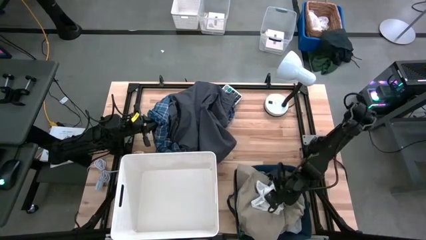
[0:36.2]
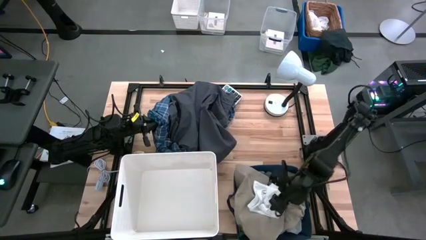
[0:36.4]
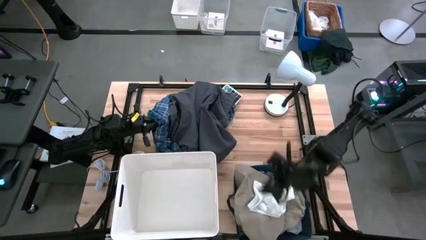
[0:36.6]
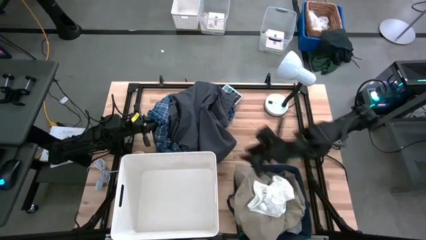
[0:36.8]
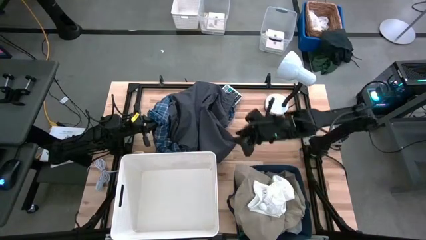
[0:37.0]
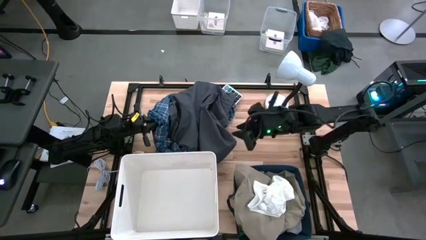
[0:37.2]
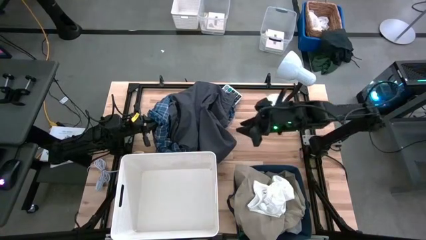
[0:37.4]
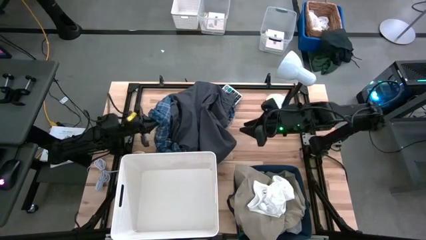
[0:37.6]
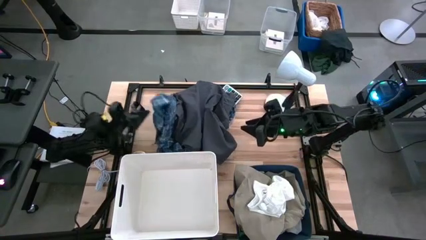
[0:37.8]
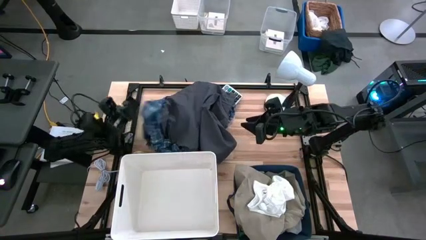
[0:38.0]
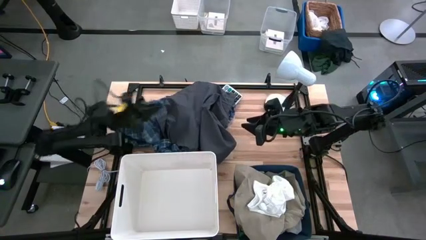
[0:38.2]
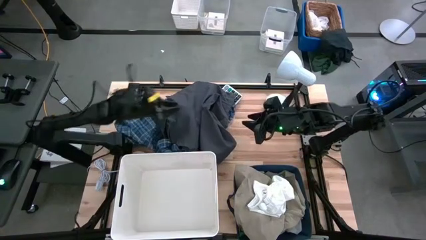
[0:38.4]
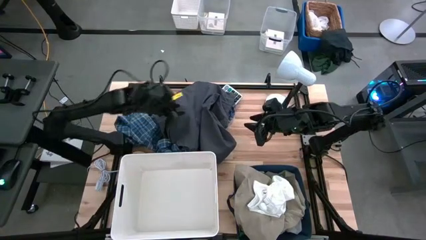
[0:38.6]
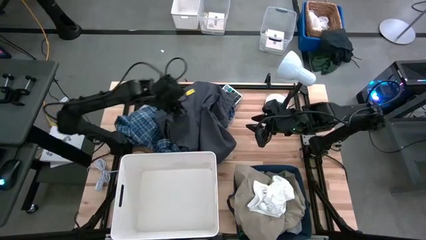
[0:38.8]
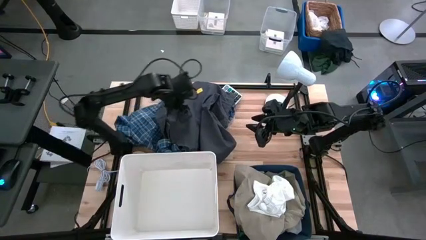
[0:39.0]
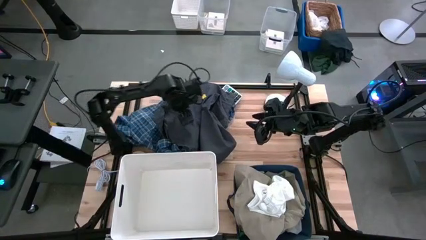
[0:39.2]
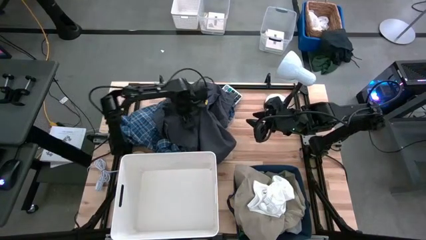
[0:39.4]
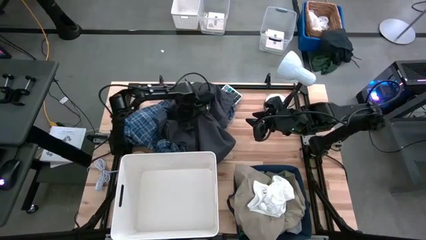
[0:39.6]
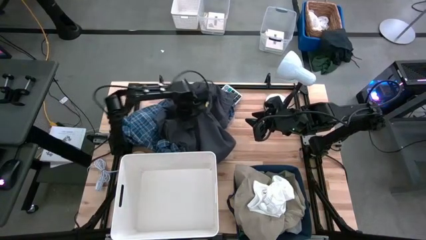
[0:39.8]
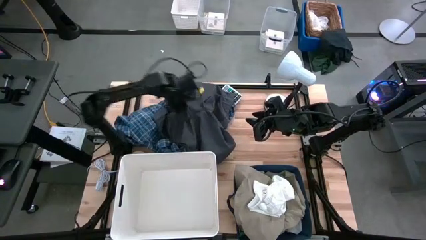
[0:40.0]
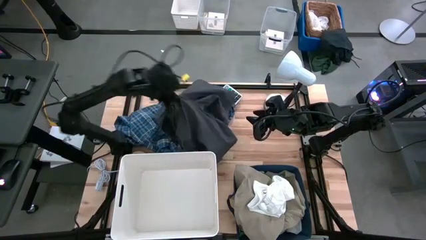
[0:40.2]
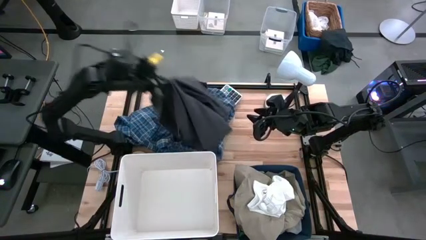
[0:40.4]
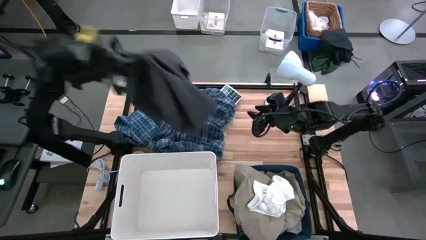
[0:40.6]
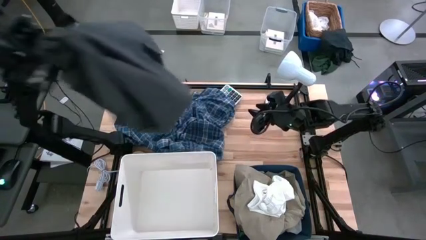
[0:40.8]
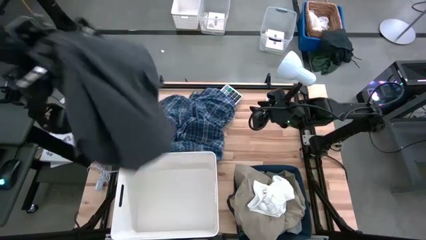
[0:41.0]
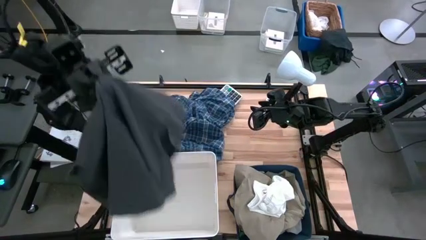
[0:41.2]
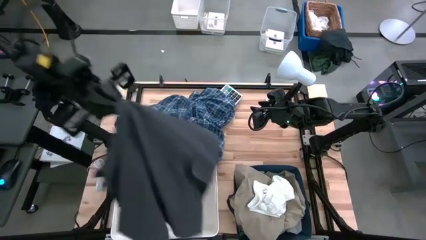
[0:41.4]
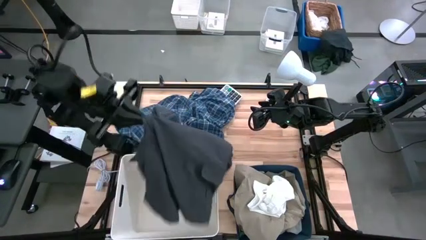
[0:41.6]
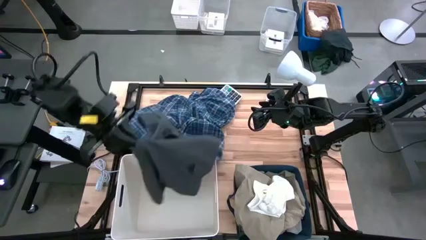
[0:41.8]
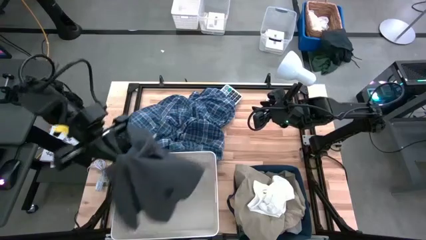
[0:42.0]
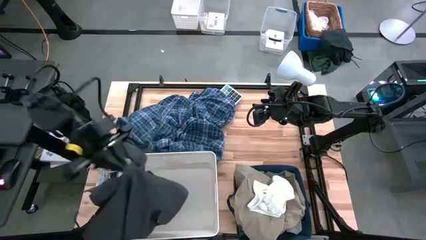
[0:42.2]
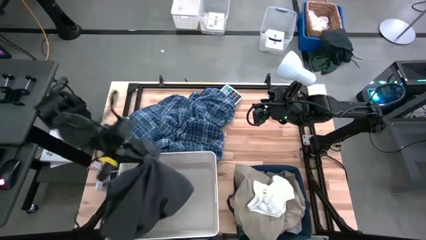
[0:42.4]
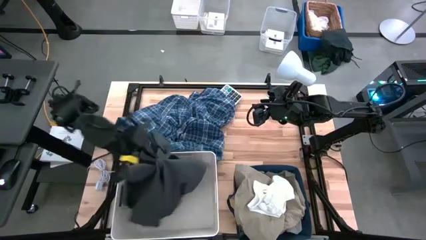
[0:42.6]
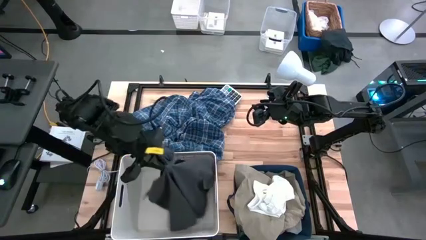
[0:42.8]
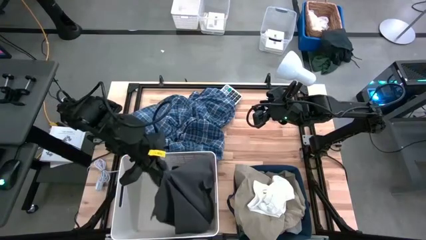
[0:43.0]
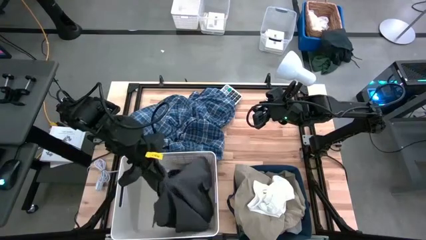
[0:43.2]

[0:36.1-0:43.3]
Task: Sort clothes
Put the blue shorts into the white bin

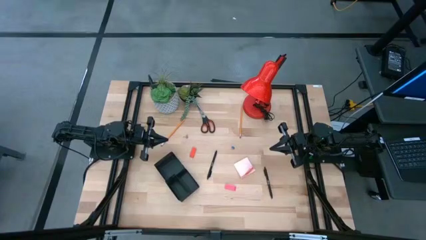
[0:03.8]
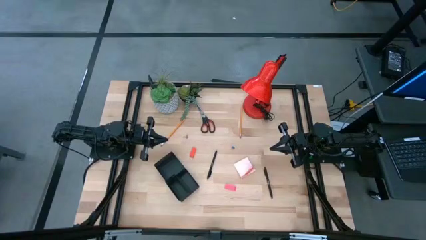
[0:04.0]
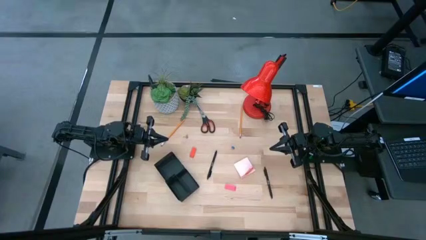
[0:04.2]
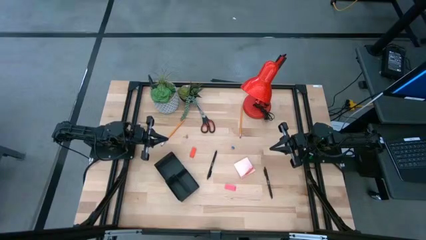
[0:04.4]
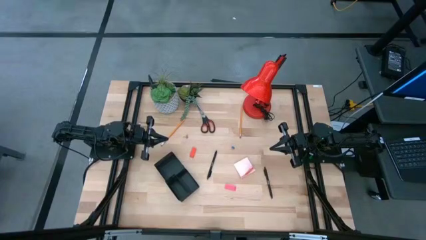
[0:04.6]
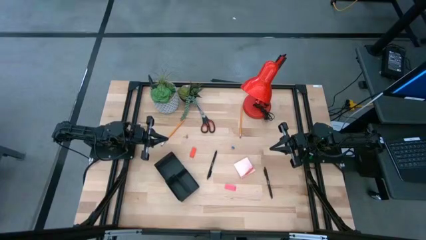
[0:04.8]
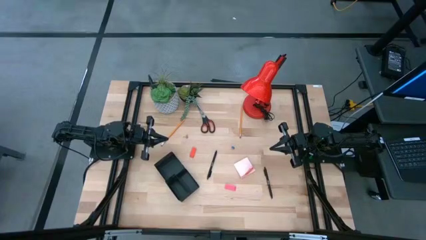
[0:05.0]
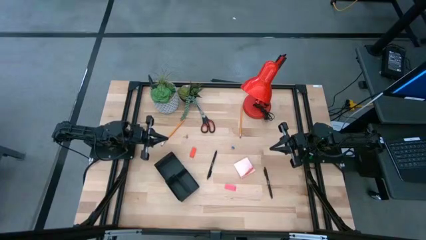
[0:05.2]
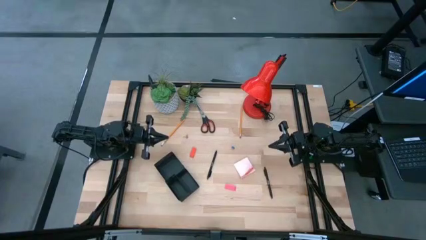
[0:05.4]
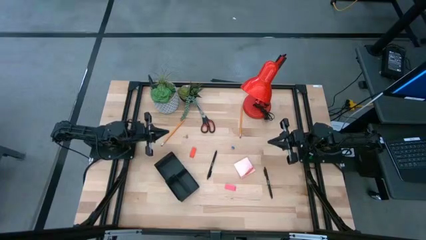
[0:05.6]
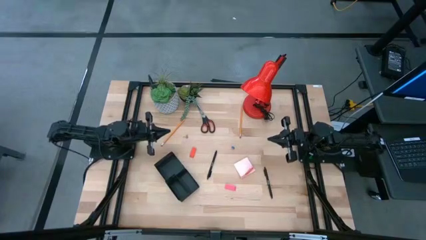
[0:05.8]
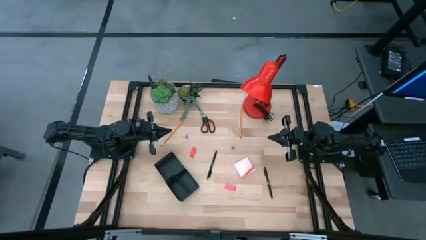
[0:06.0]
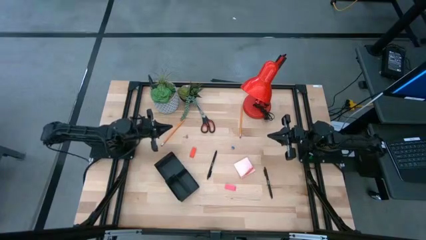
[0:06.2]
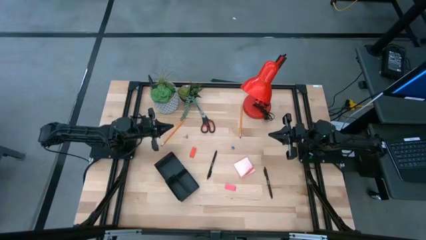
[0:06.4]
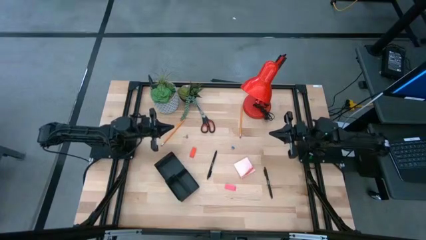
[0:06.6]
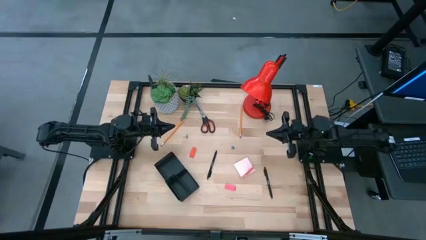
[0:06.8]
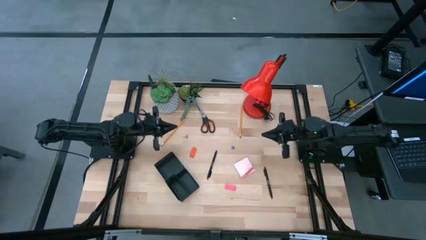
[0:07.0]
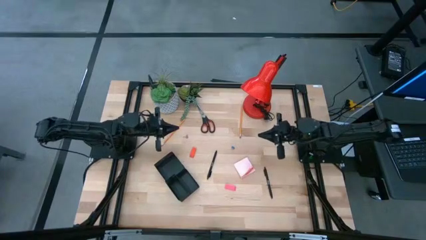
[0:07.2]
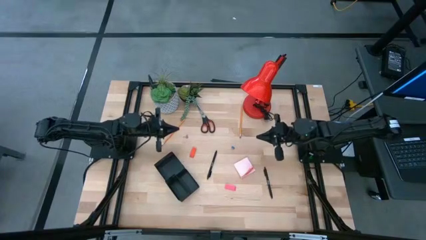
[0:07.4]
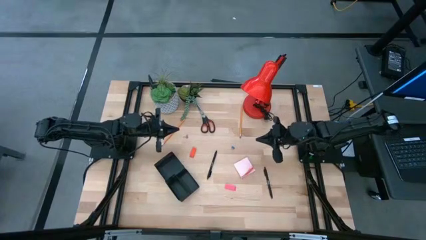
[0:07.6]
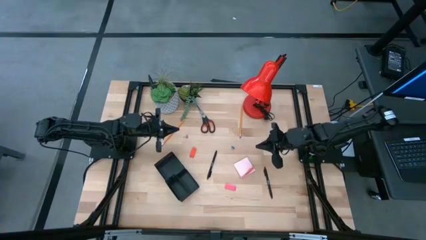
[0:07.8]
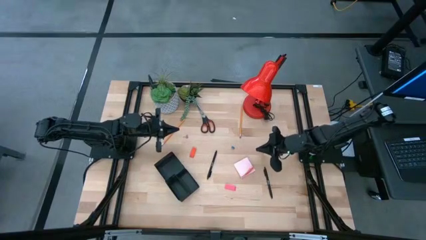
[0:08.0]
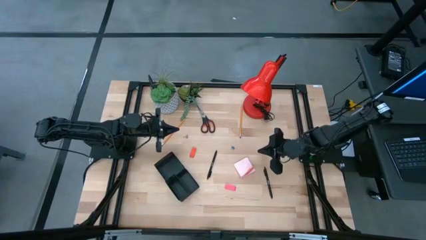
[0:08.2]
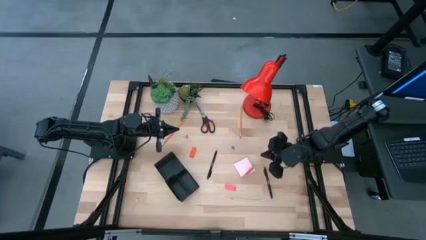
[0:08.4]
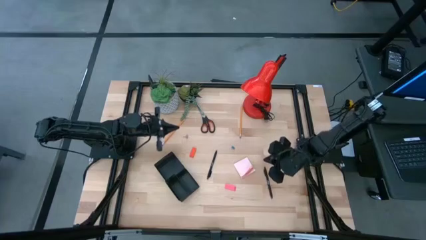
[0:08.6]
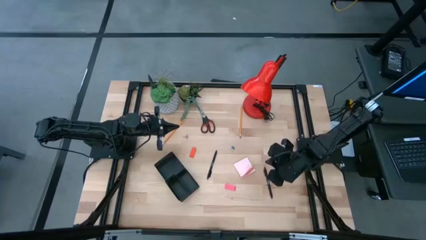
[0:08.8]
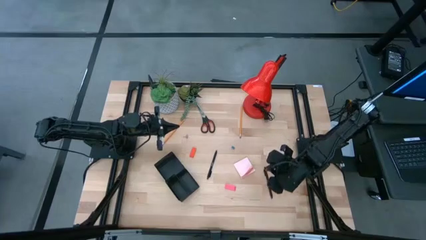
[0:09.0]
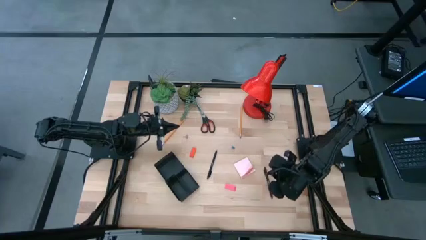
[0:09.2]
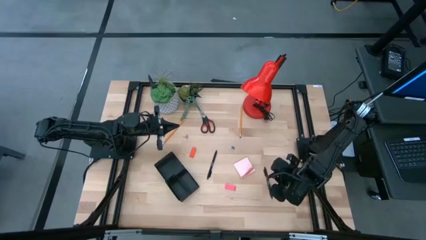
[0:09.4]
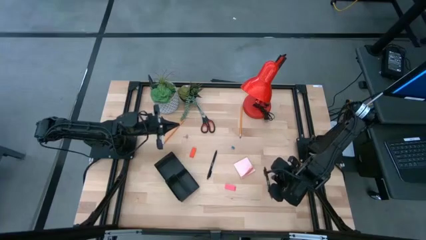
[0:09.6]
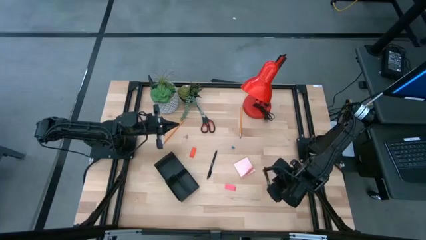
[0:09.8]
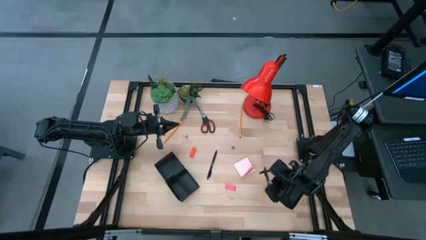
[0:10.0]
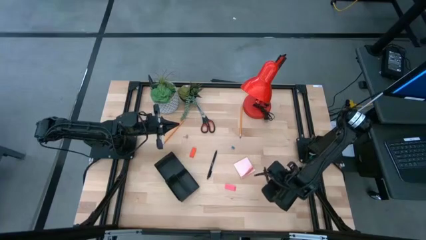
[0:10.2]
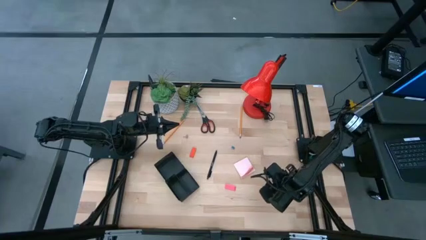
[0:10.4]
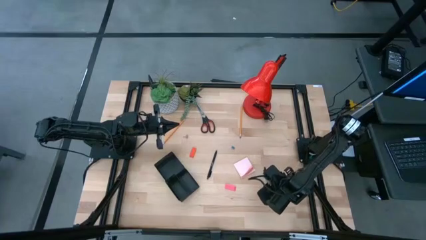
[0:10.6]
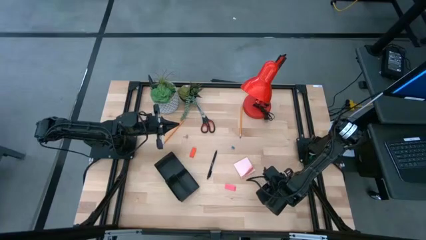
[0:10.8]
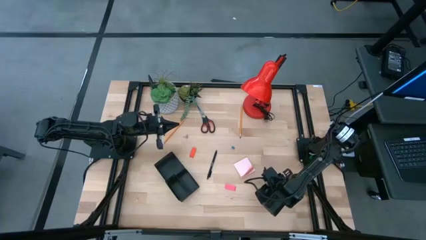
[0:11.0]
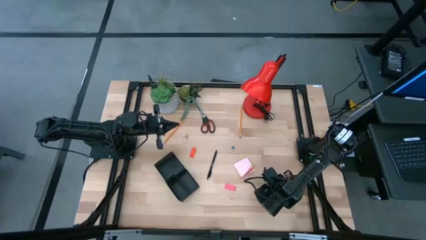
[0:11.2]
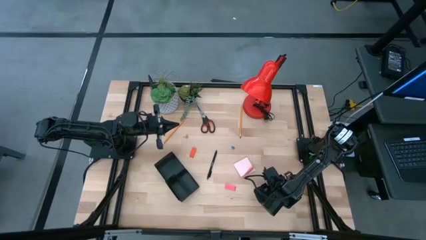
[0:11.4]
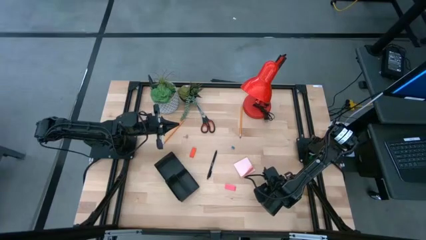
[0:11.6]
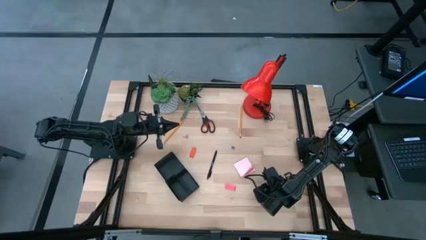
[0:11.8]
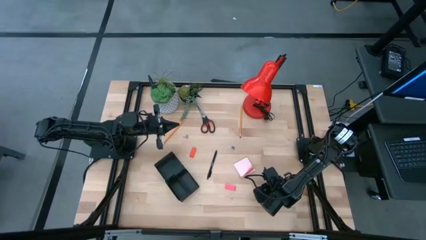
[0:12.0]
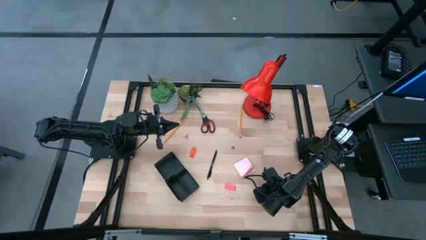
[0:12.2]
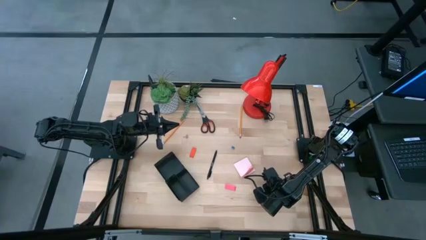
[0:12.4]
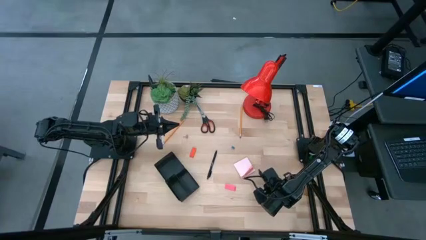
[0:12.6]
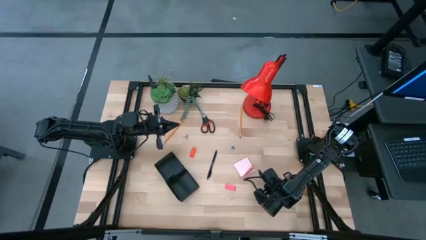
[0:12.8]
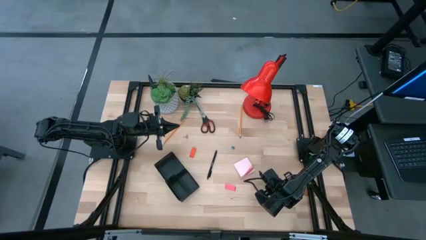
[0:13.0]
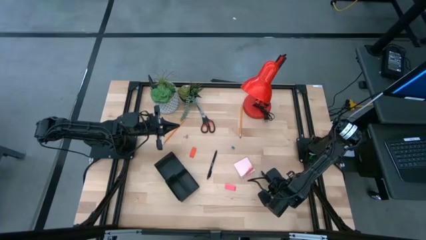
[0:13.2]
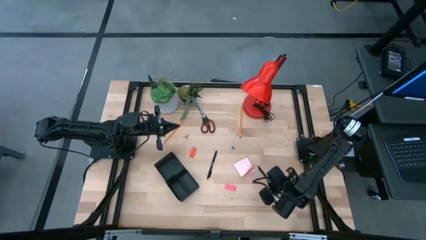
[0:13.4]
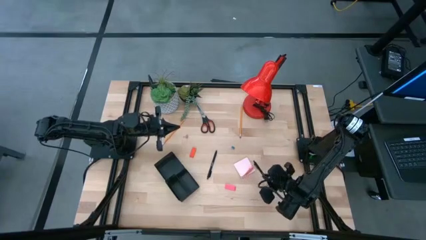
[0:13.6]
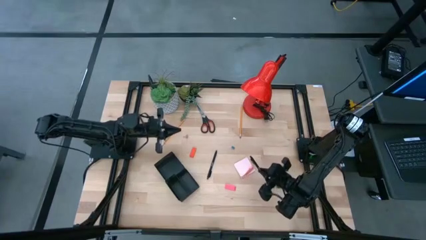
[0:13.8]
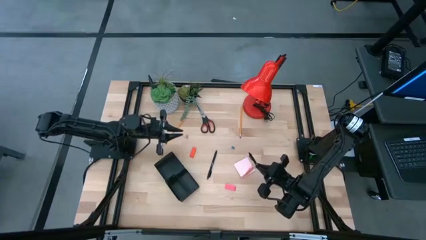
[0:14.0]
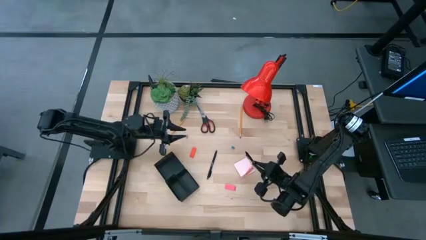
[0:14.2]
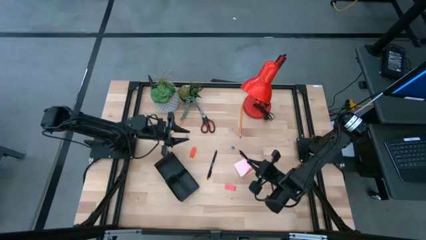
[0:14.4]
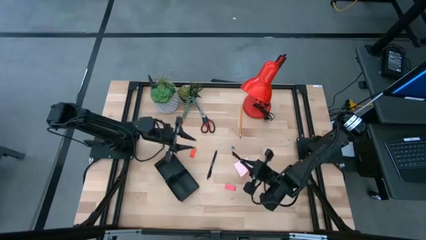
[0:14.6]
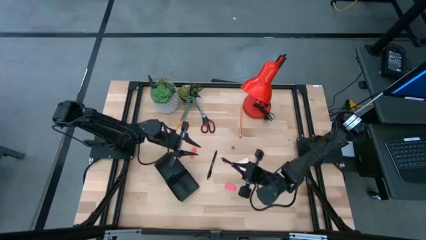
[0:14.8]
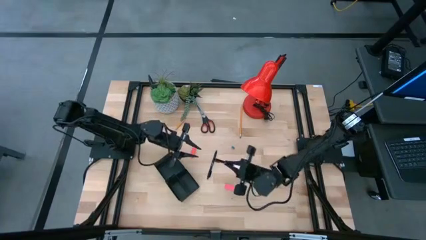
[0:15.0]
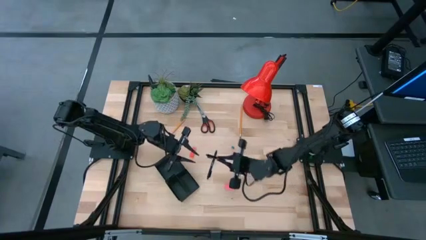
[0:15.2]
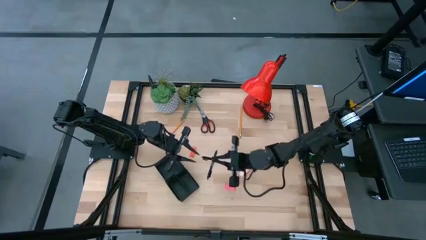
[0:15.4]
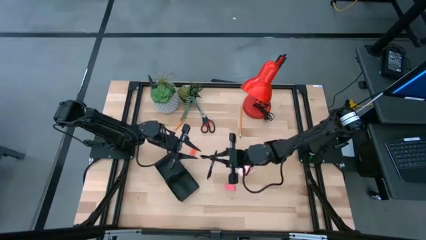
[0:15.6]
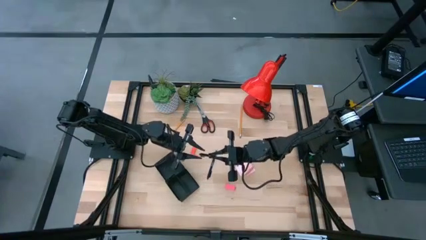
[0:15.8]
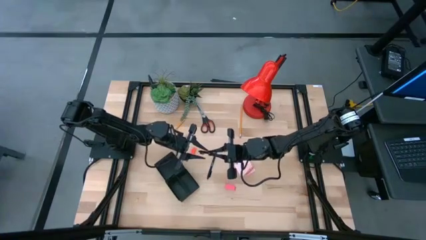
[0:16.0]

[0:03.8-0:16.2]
Task: Pick and place office supplies into organizer
Put the right black pen into the black desk organizer
